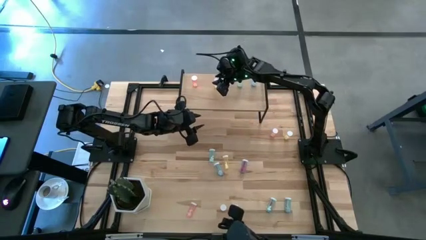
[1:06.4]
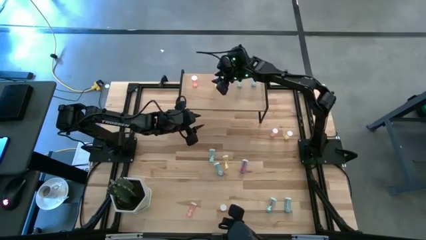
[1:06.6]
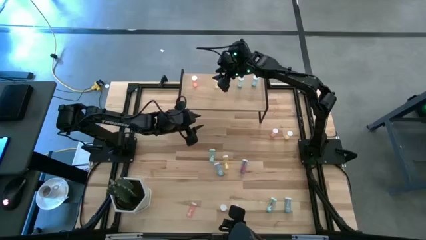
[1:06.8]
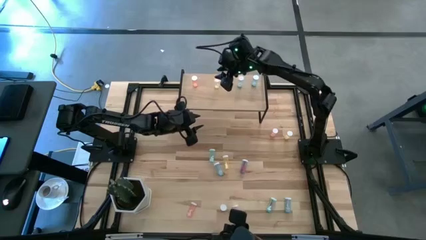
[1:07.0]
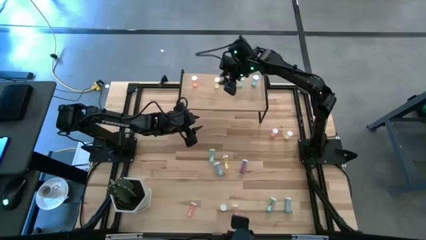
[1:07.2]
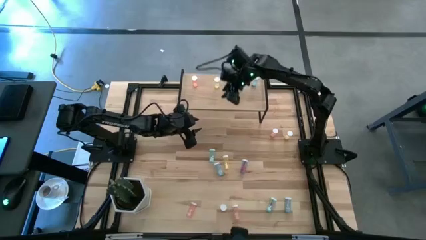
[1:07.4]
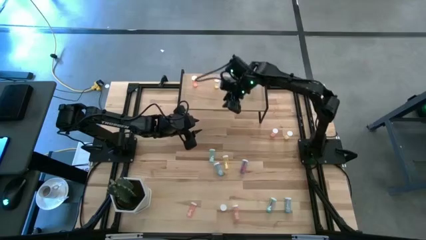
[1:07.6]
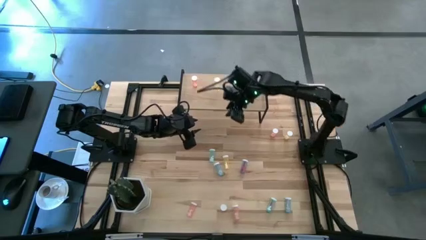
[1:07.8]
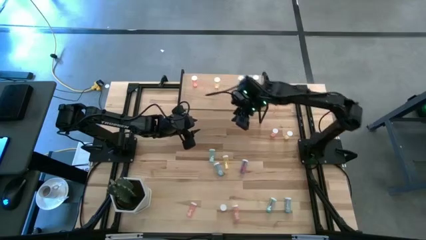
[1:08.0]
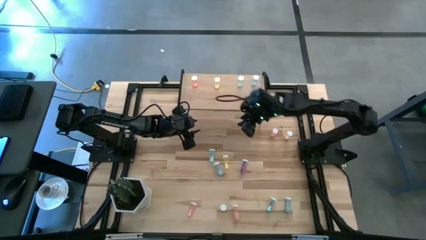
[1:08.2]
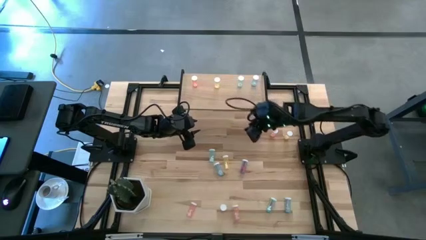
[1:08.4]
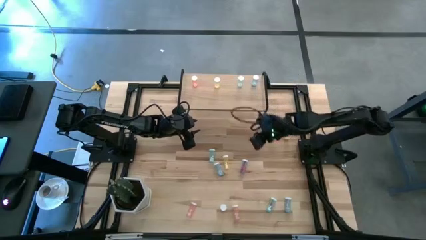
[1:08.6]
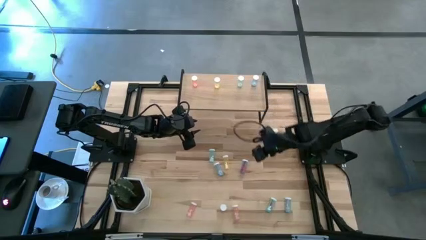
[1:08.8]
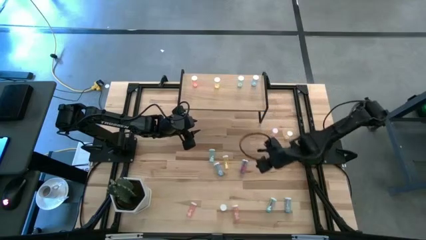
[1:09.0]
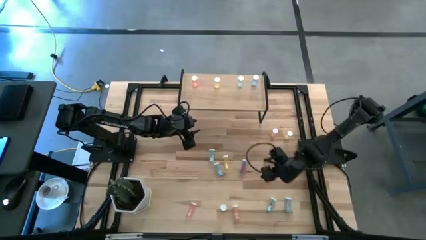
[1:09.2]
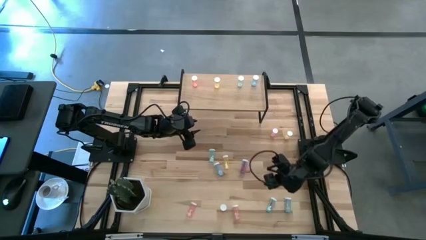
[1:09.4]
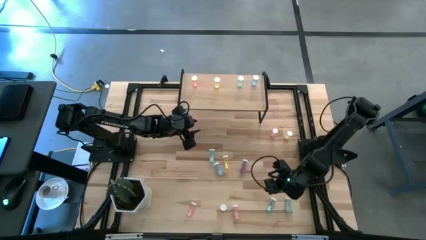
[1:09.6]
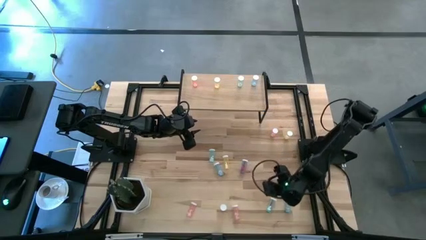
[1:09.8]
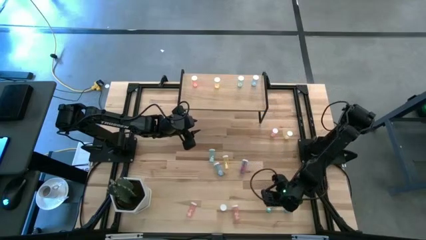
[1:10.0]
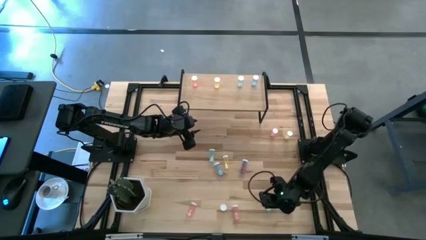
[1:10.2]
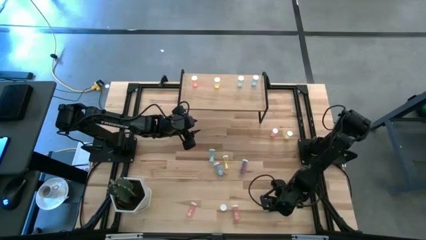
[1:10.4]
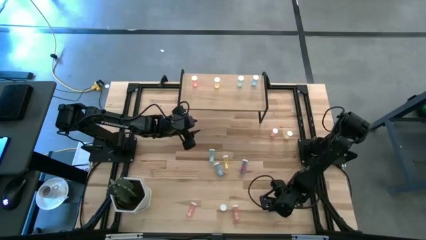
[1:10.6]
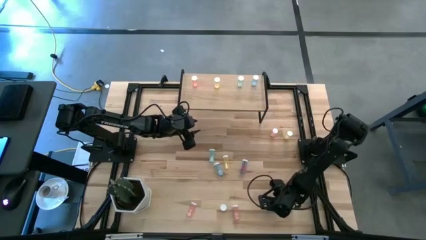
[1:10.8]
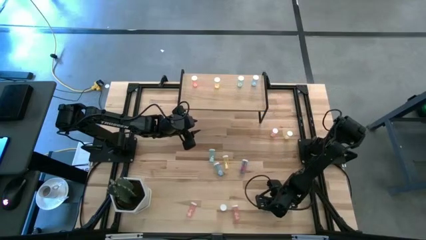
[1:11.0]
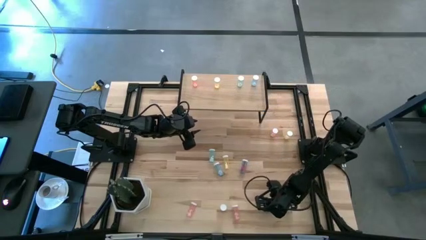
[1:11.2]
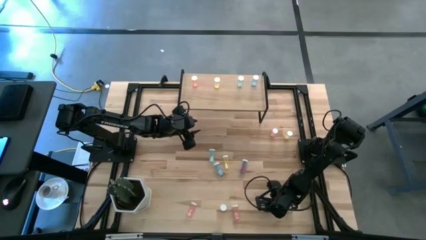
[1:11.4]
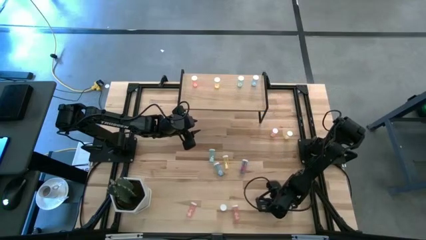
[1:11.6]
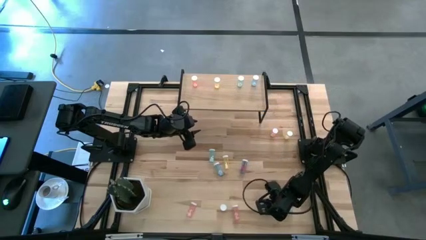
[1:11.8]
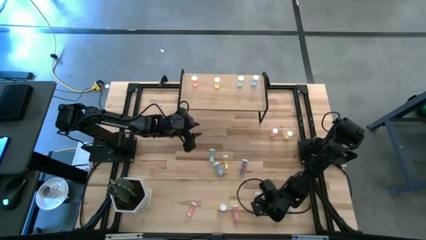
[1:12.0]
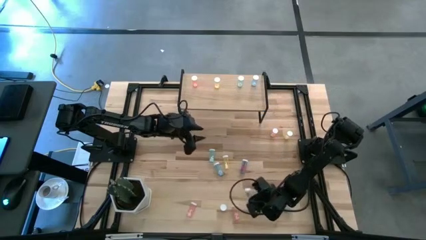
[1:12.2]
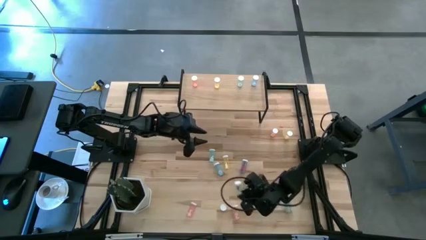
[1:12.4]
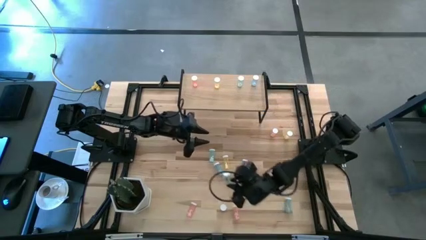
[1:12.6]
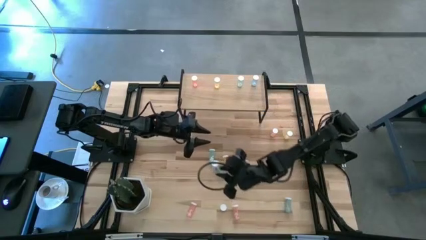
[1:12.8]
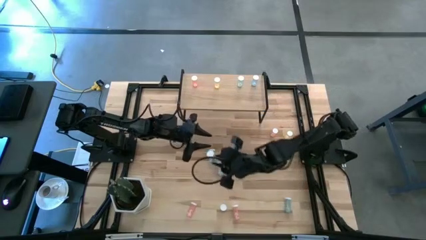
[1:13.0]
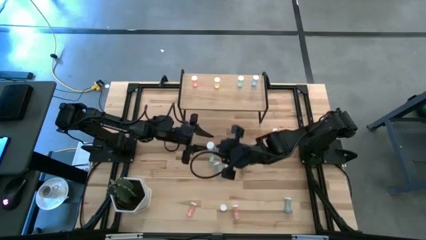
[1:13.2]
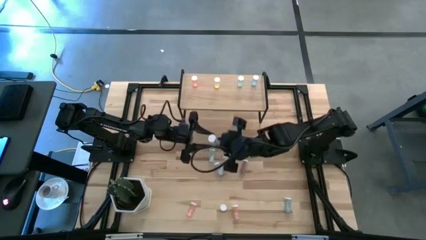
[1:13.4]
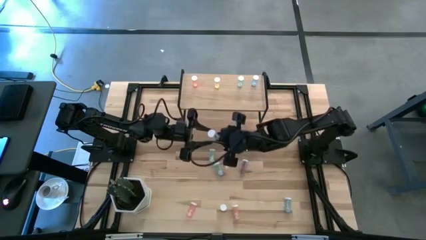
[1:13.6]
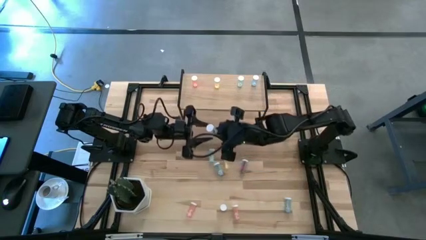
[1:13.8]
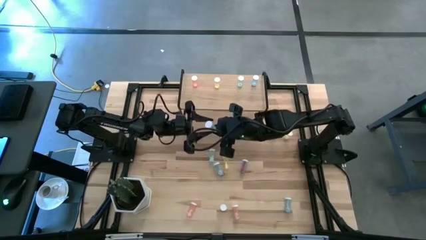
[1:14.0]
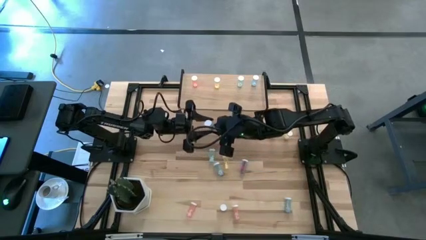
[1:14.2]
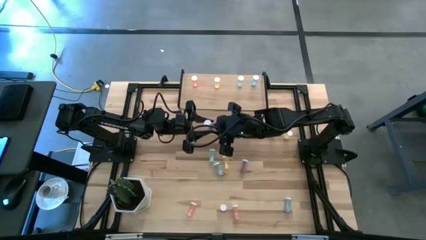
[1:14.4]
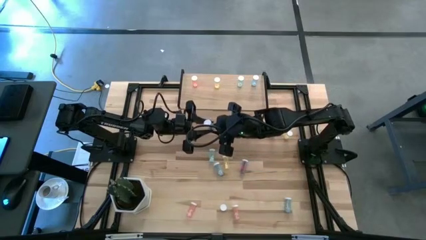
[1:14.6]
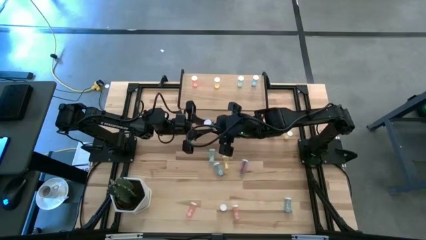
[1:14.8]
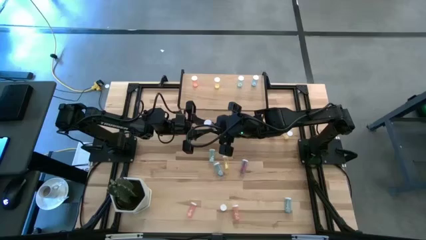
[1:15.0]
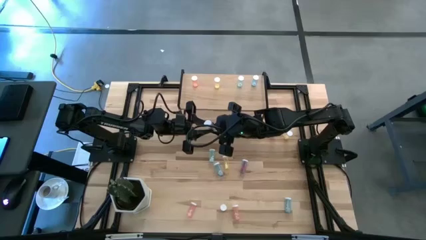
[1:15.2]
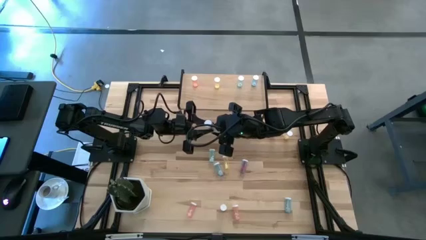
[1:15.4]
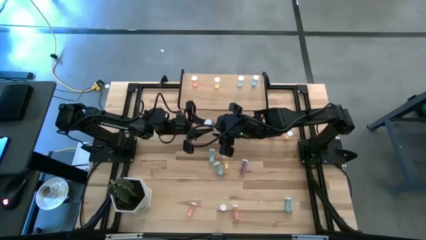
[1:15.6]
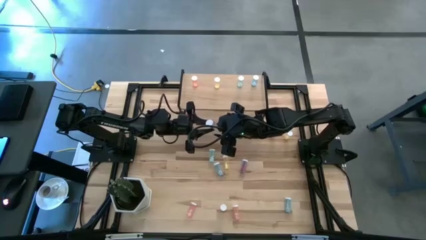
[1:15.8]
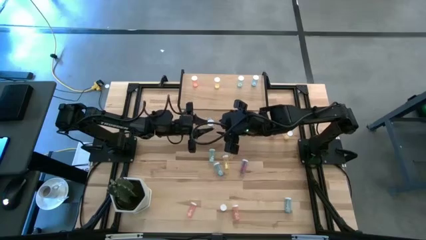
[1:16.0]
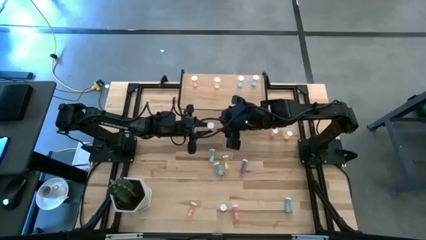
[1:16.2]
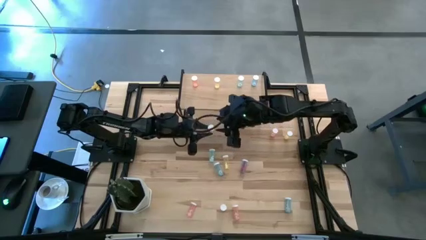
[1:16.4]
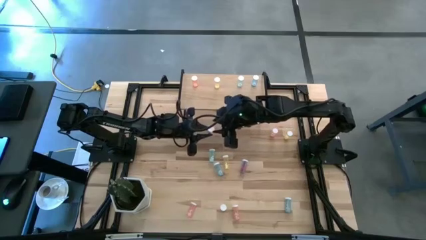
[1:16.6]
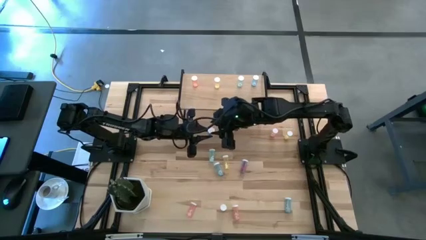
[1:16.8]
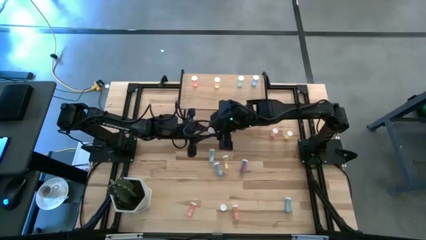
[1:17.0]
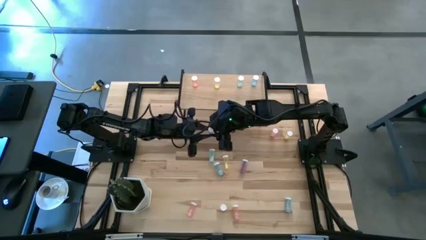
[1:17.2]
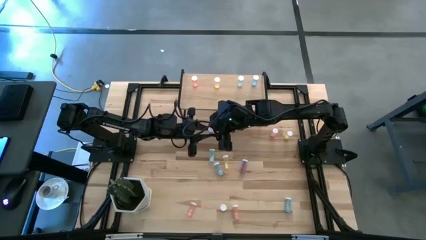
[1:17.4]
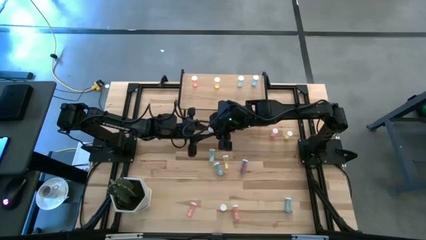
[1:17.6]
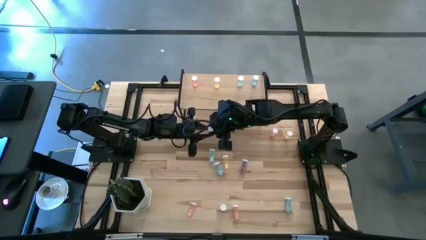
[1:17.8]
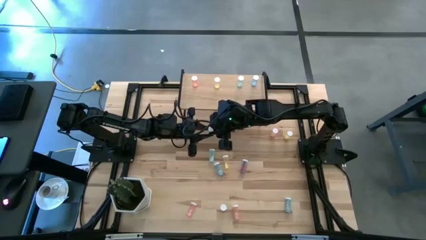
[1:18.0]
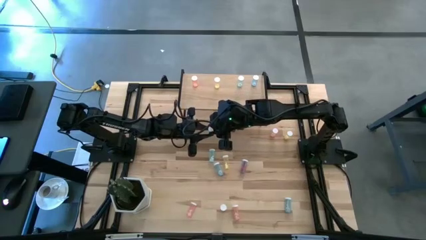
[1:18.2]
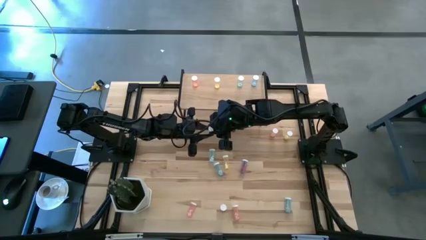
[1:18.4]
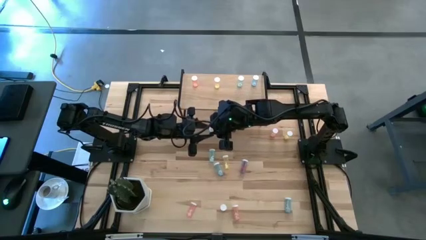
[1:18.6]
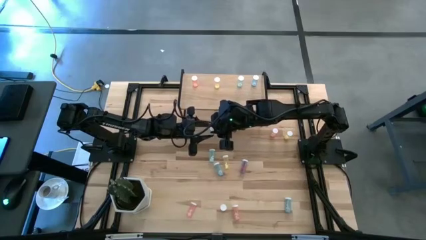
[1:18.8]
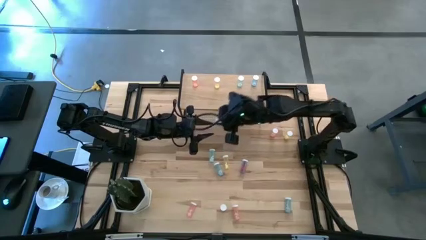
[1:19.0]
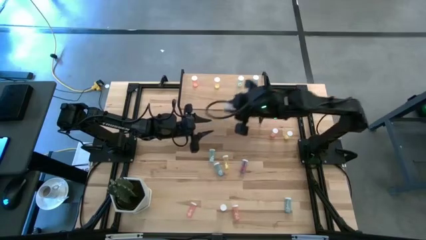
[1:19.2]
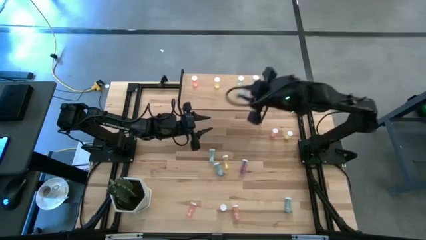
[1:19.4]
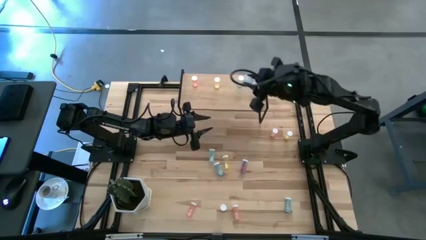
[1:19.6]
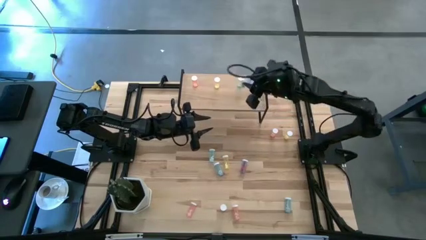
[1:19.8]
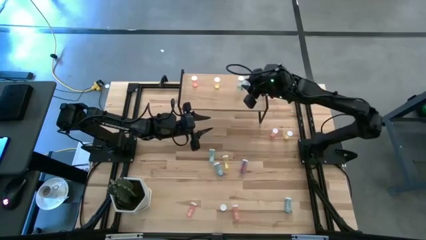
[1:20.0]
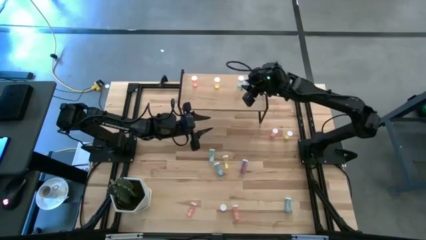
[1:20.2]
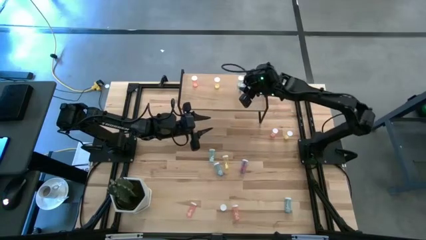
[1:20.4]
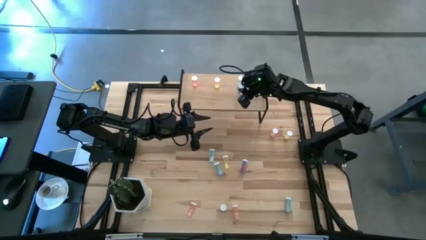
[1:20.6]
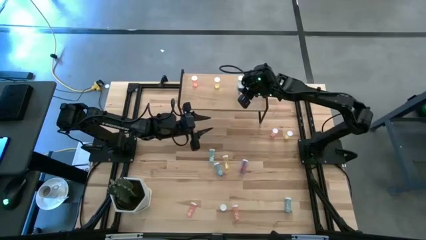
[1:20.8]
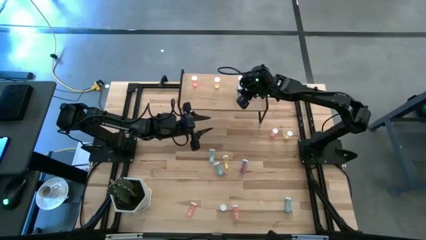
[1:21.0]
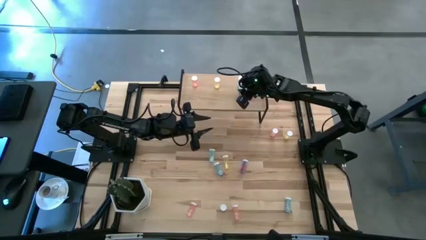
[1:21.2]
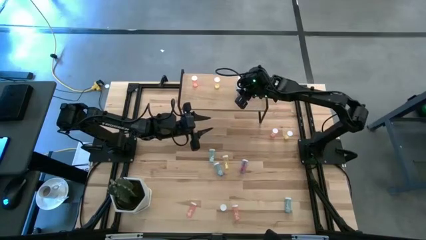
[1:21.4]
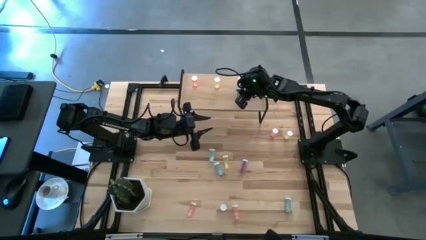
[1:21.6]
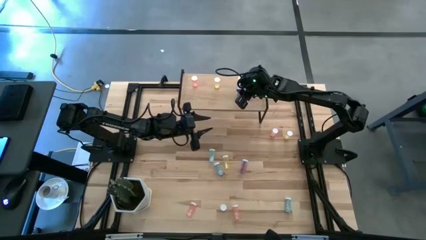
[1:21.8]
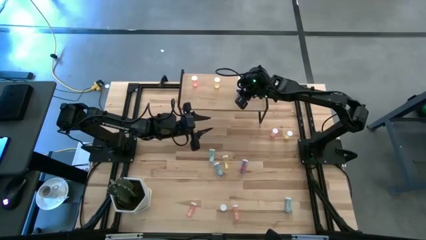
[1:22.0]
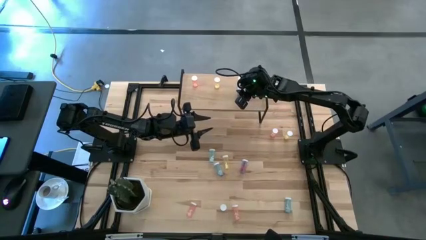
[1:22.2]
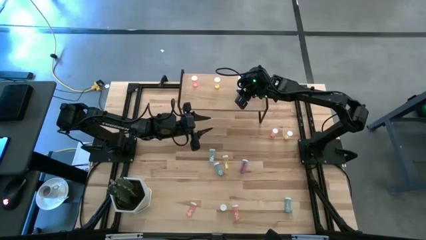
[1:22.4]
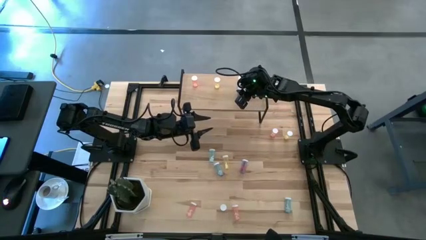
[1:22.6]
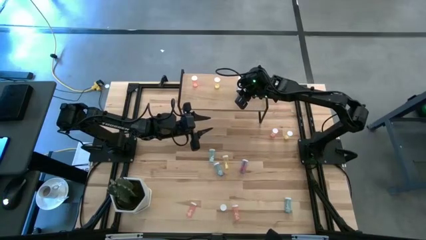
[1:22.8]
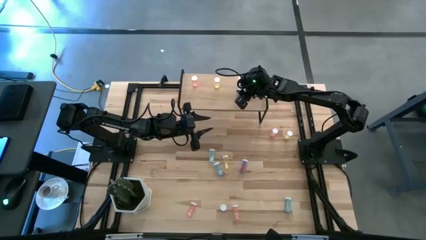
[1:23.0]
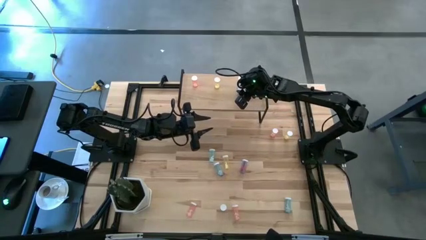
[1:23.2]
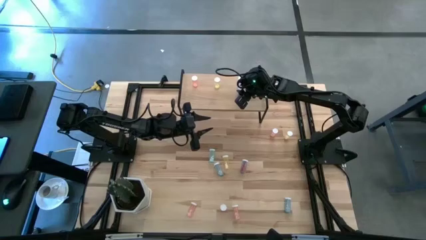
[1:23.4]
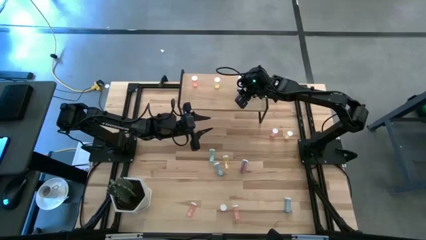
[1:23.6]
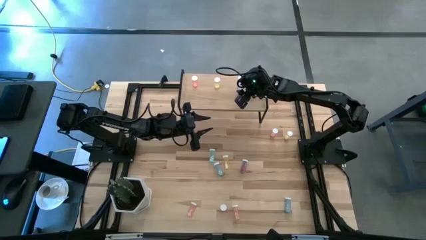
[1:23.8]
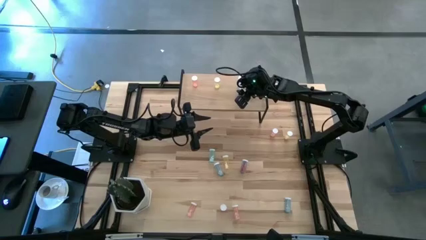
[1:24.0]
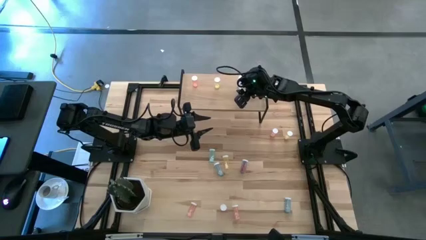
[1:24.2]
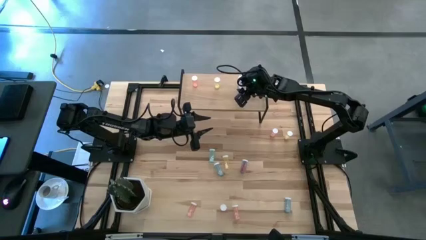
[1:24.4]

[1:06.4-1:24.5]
Task: Pick and place medicine bottles onto shelf by color
Put the light blue pill bottle on the shelf aligned with the other light blue pill bottle
